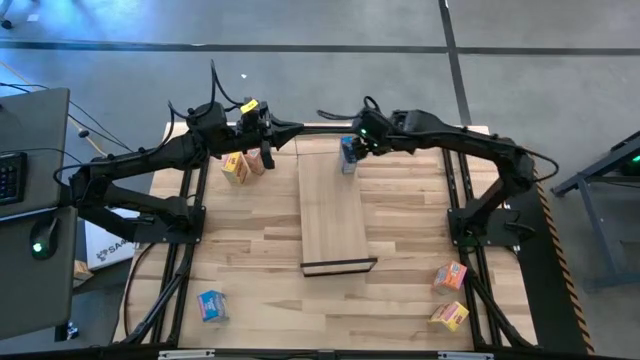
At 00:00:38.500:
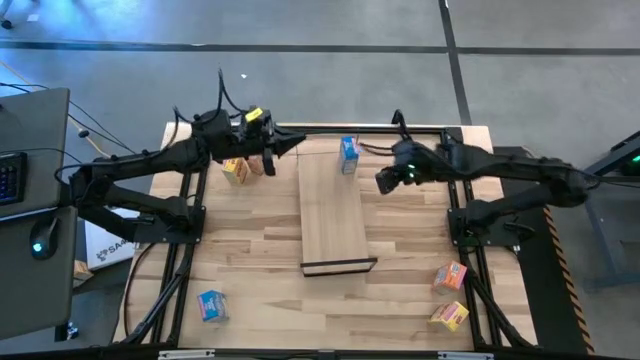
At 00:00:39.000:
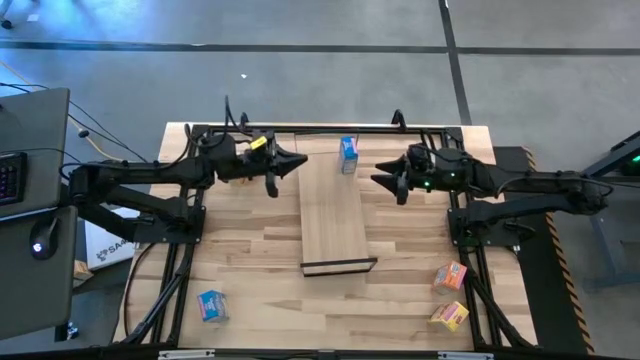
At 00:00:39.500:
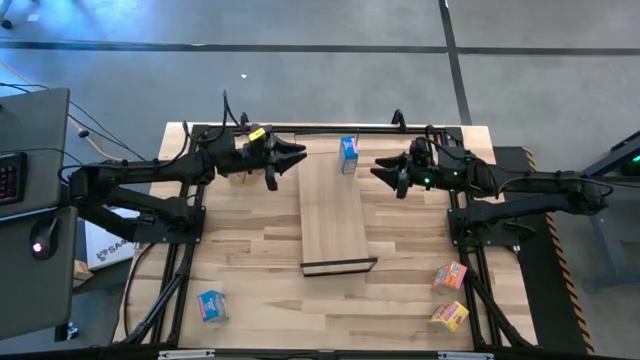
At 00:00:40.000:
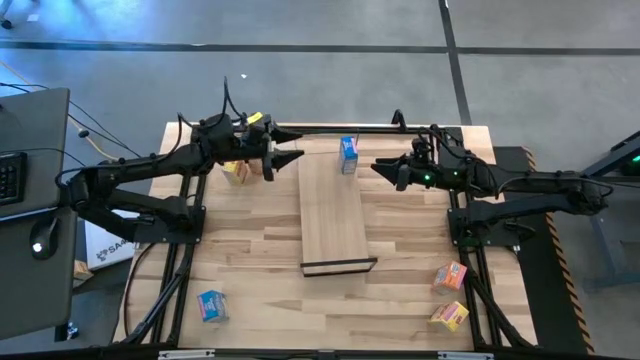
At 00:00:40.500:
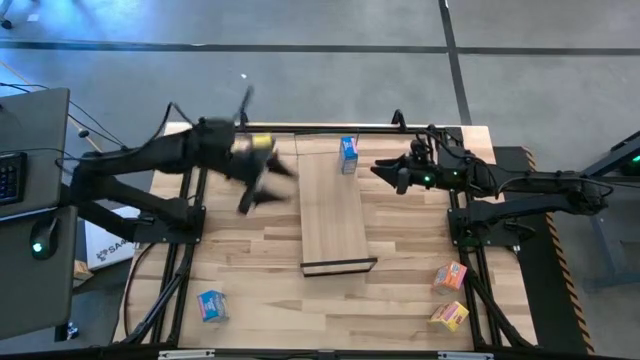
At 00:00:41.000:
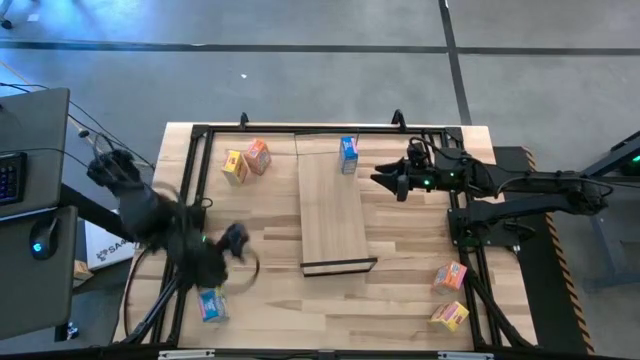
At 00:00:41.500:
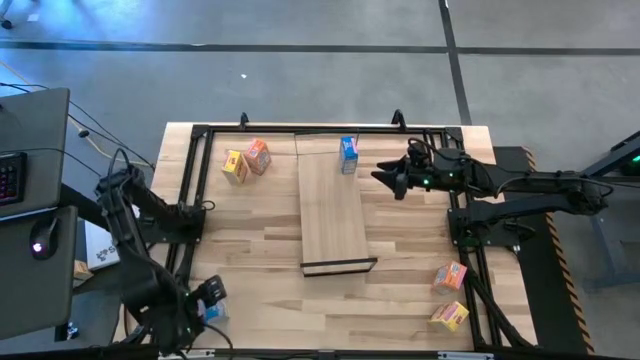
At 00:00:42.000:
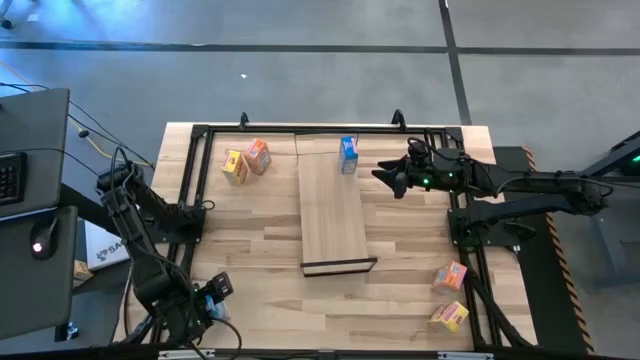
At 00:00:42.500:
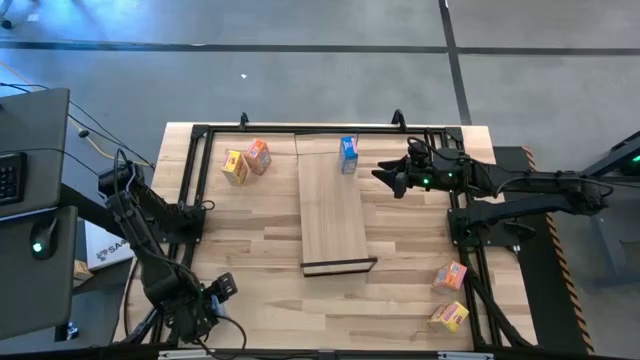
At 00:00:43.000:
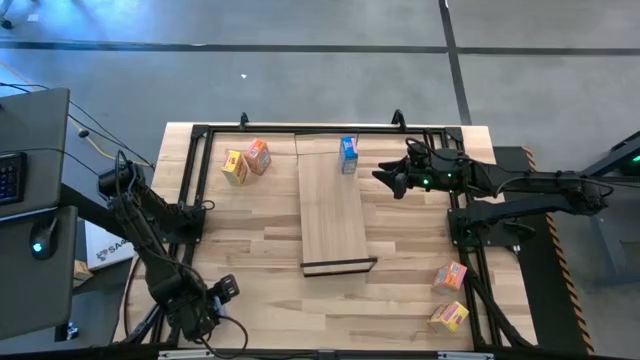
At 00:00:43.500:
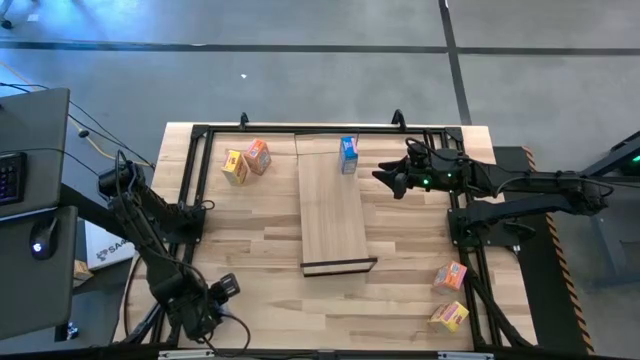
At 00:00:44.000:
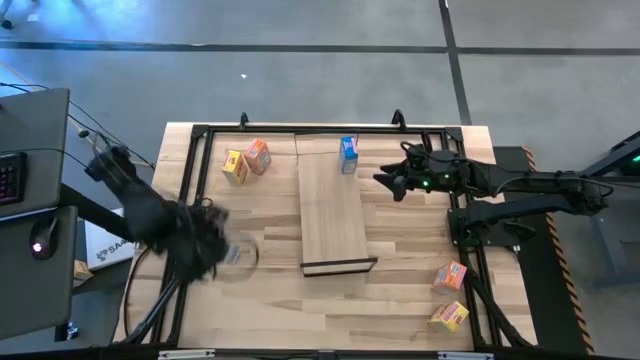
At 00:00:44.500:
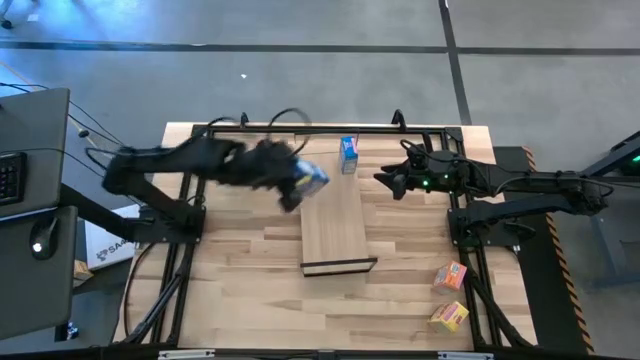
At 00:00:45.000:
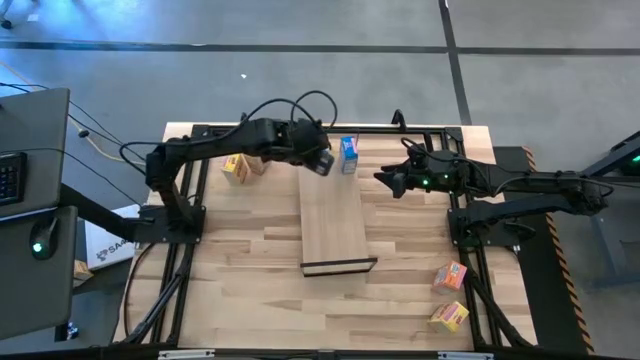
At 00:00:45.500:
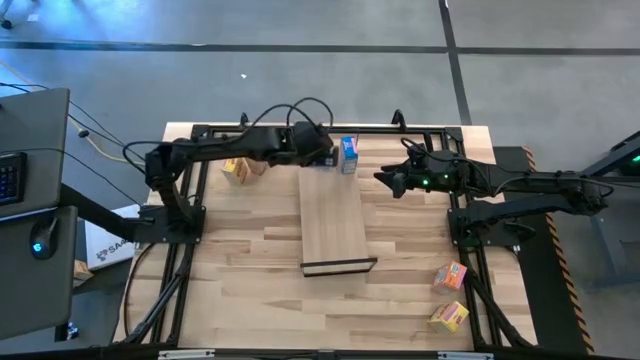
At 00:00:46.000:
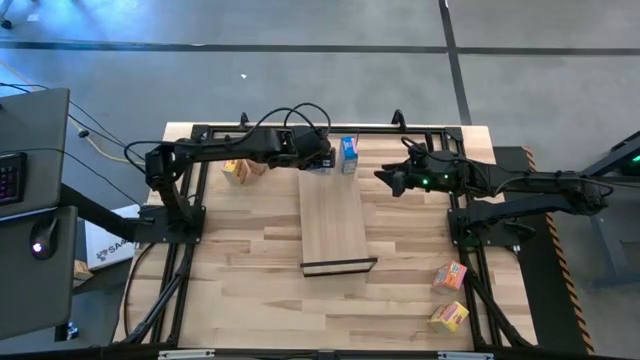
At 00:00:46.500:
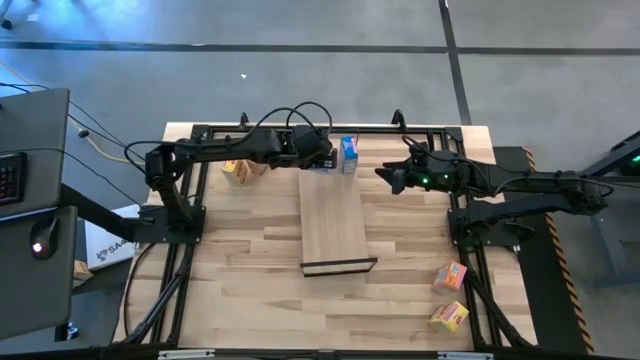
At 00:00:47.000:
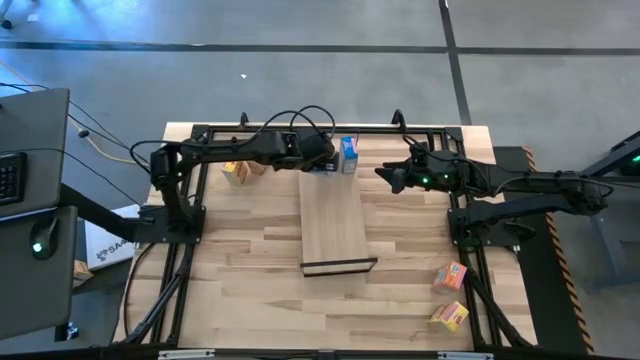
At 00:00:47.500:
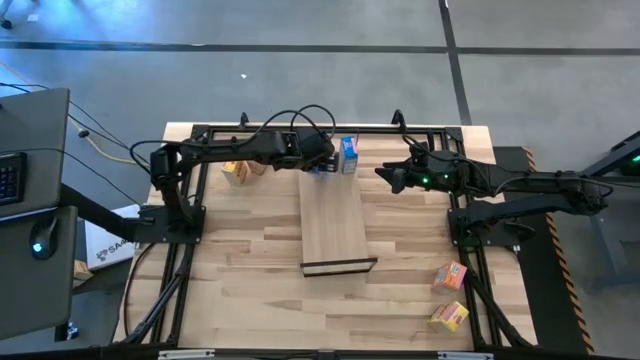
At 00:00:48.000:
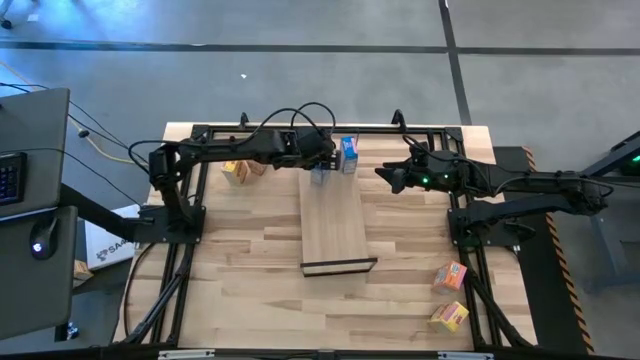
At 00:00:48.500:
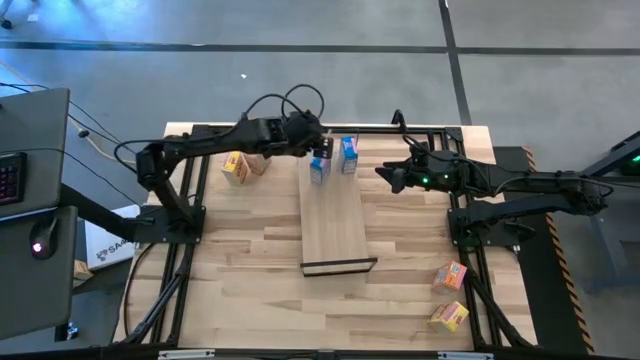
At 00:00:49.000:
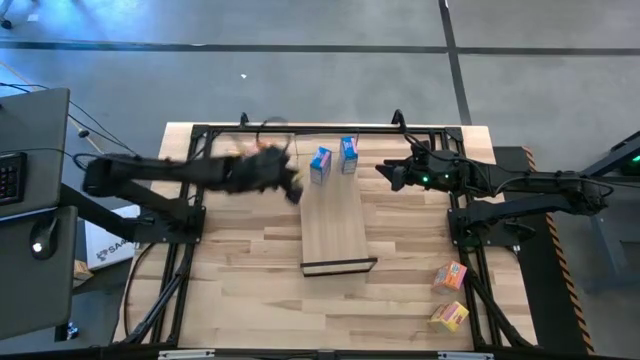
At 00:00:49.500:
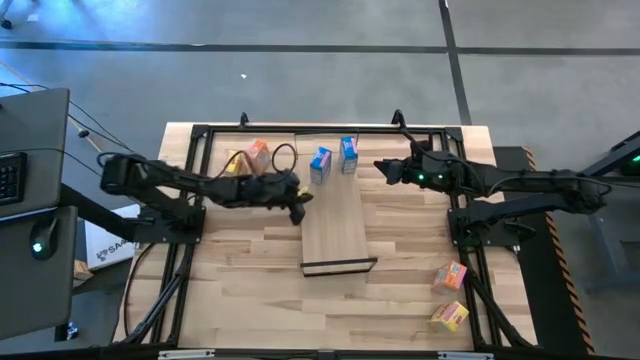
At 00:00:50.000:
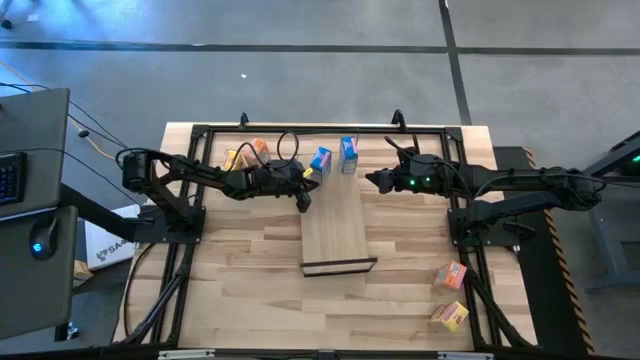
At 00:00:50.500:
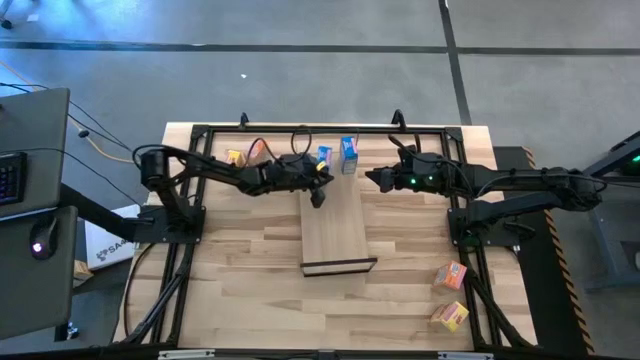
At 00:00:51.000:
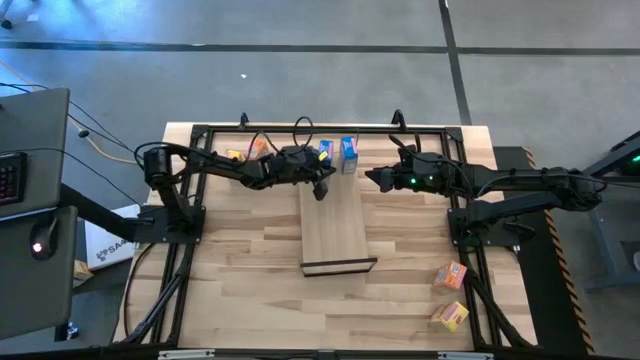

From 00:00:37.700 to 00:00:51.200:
Task: Stack cereal on shelf
Put the blue cereal box on the shelf aligned with the other blue cereal box
